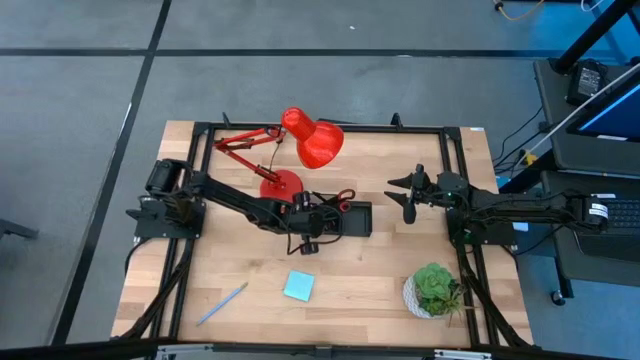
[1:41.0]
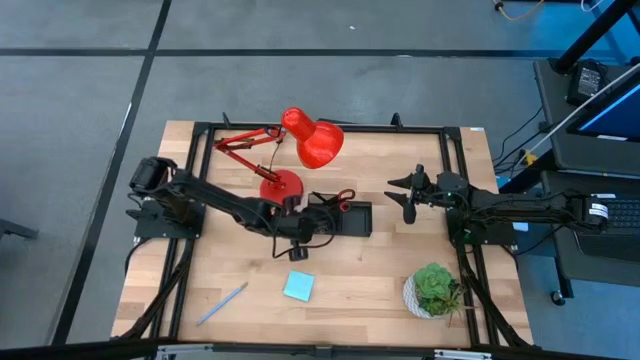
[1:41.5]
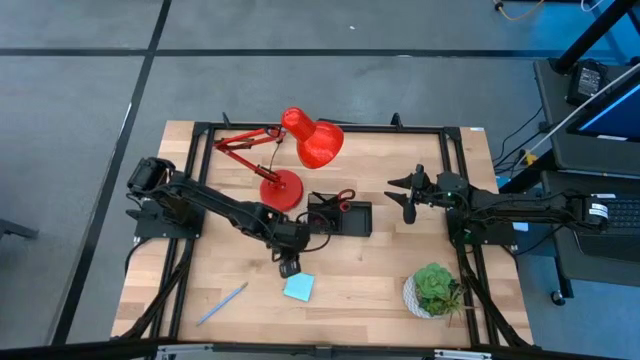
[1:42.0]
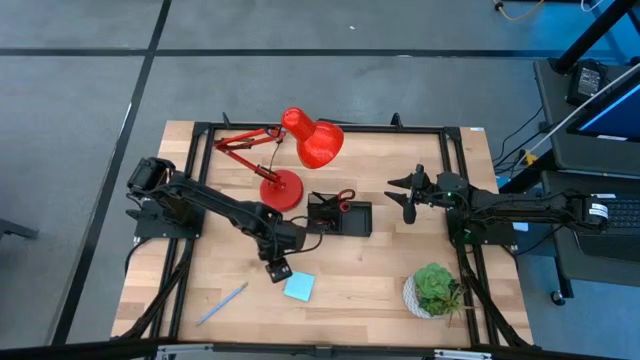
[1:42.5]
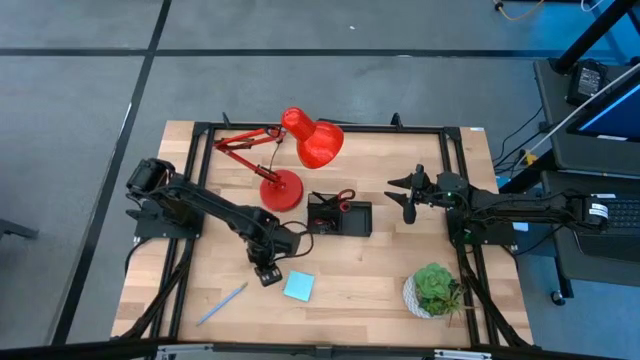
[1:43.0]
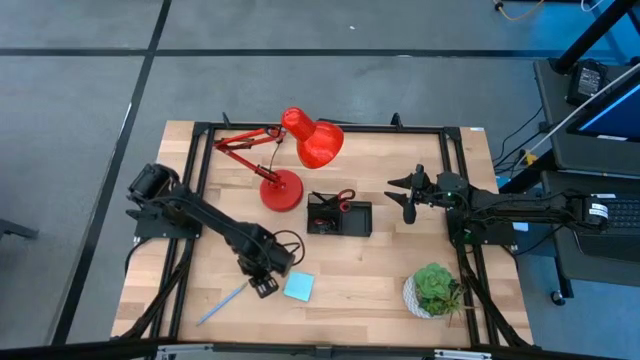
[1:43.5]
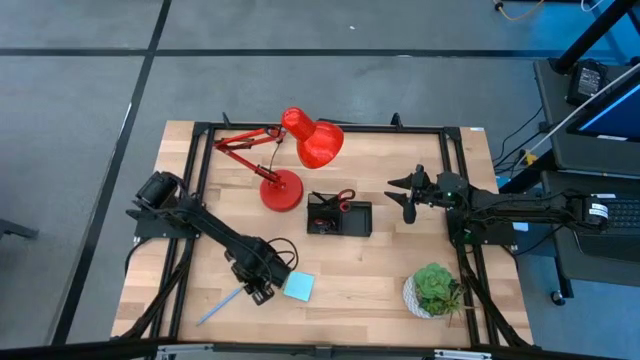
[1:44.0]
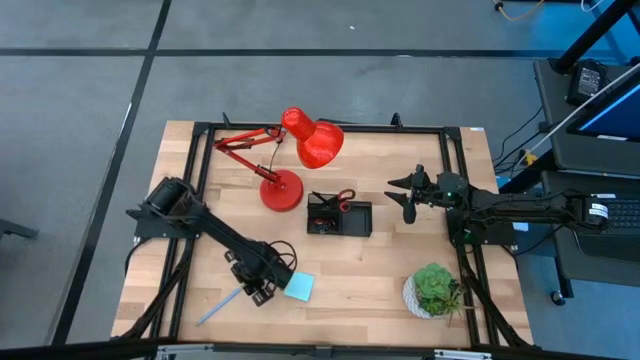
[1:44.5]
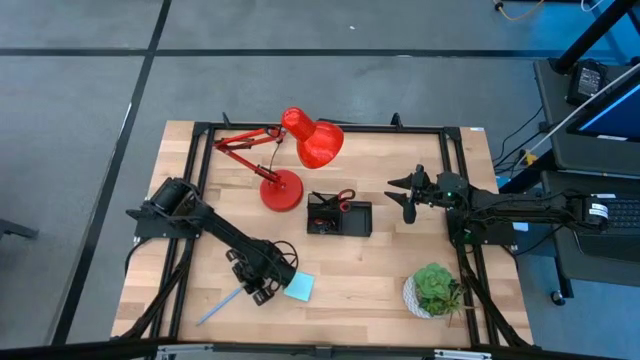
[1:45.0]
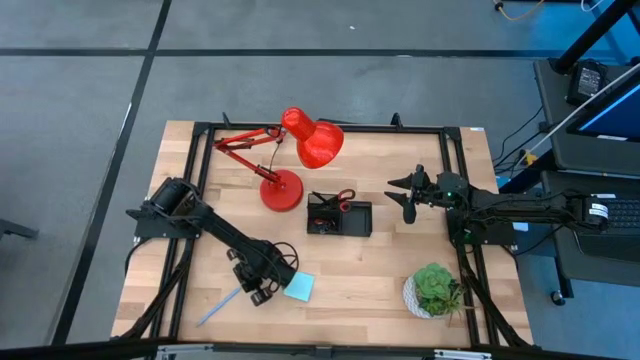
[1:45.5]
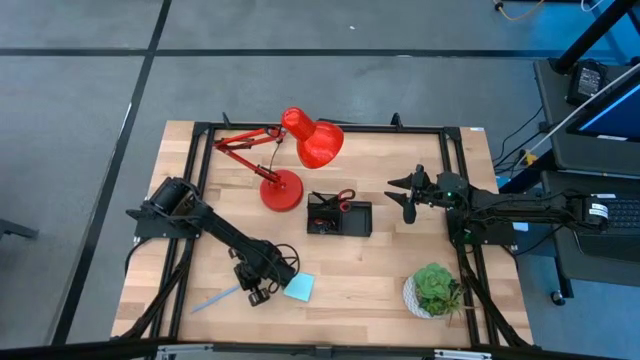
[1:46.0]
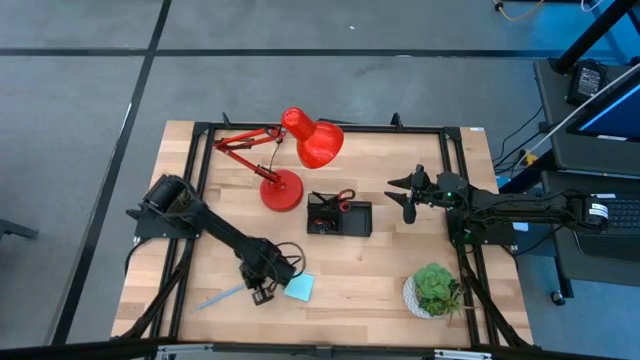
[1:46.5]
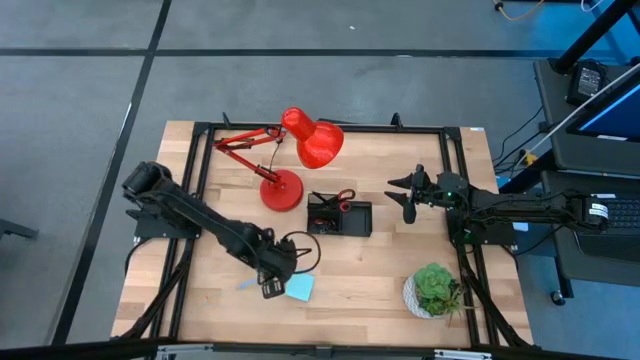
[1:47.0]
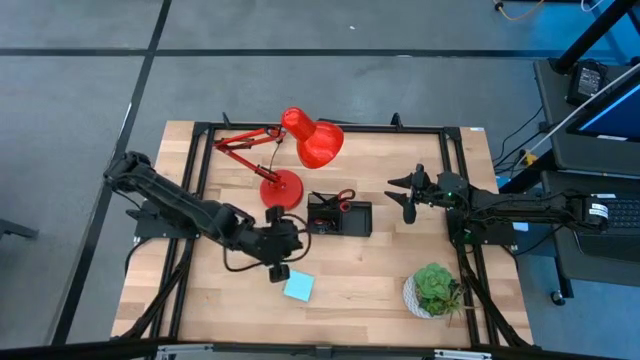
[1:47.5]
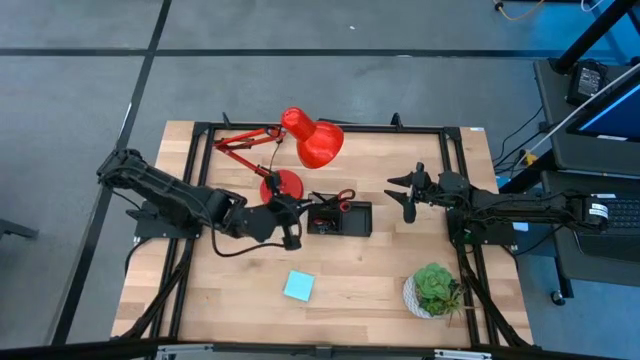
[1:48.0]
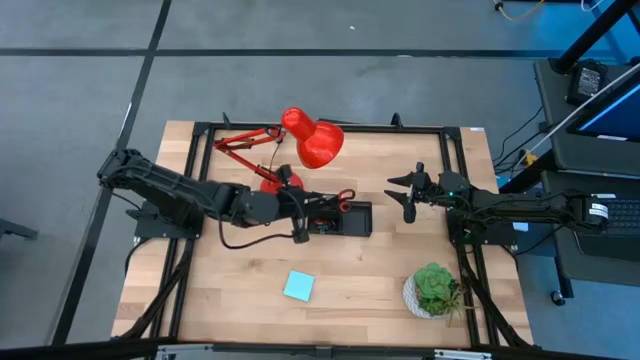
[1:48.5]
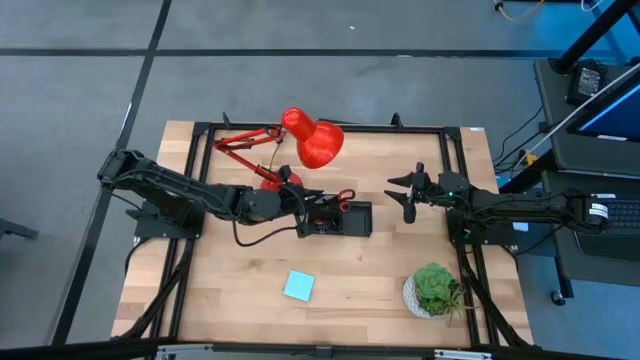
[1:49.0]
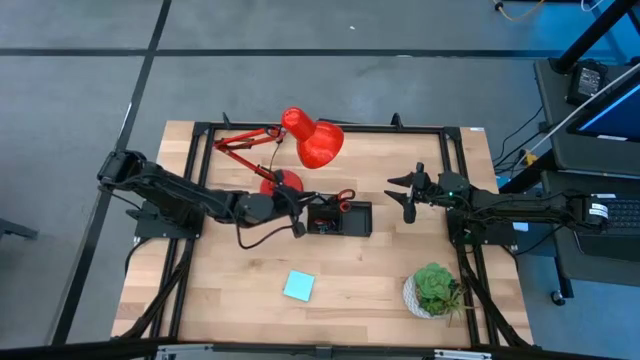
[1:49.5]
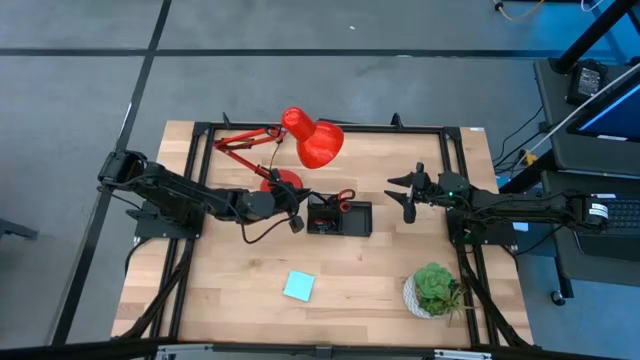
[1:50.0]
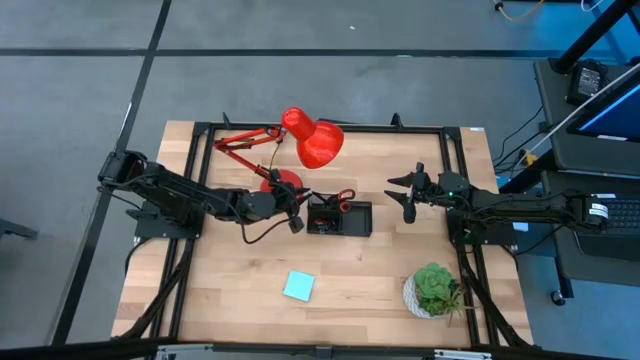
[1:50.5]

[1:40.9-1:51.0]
Task: Pick and place office supplies into organizer
Put the blue pencil into the black desk organizer

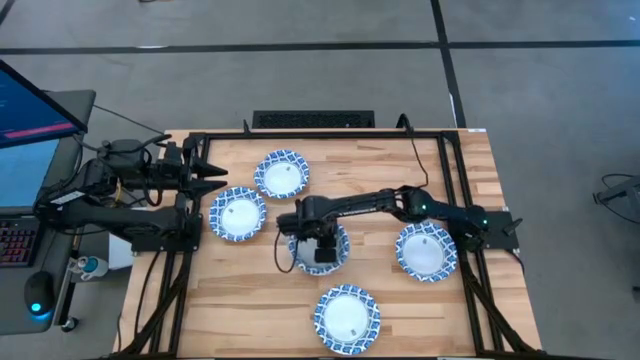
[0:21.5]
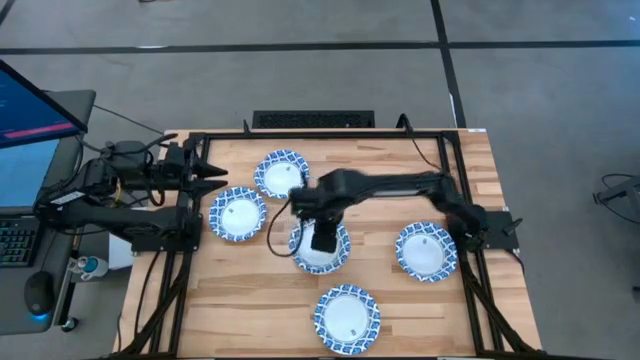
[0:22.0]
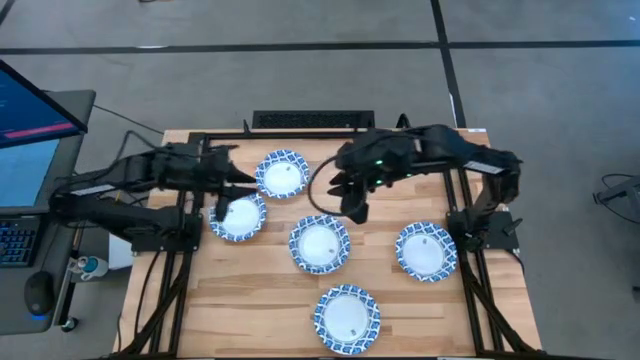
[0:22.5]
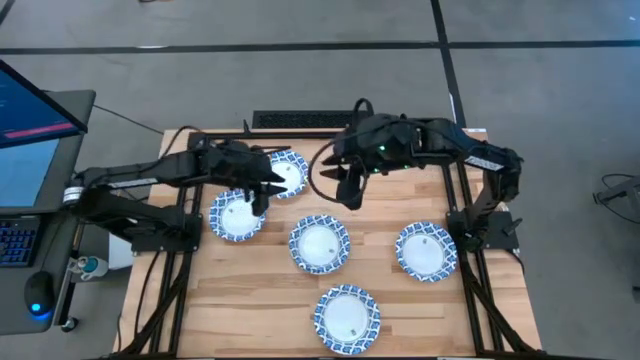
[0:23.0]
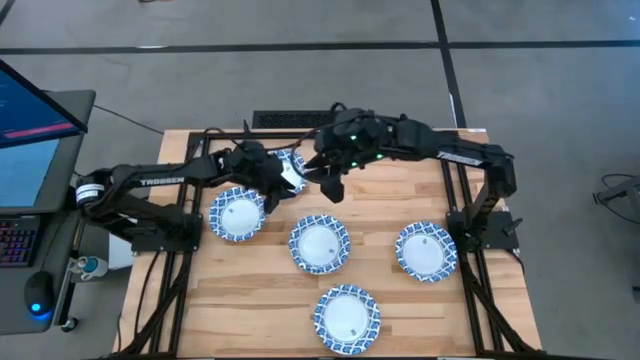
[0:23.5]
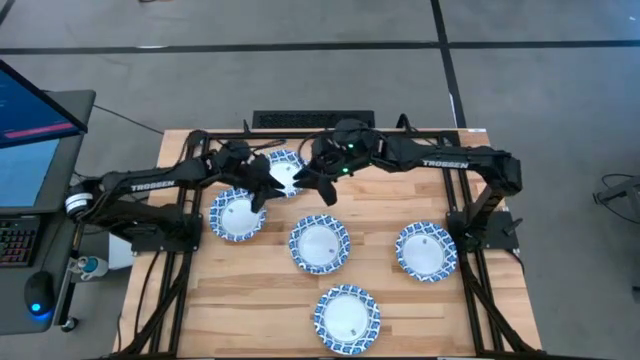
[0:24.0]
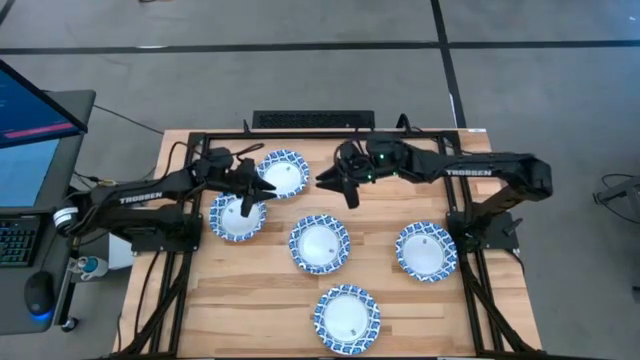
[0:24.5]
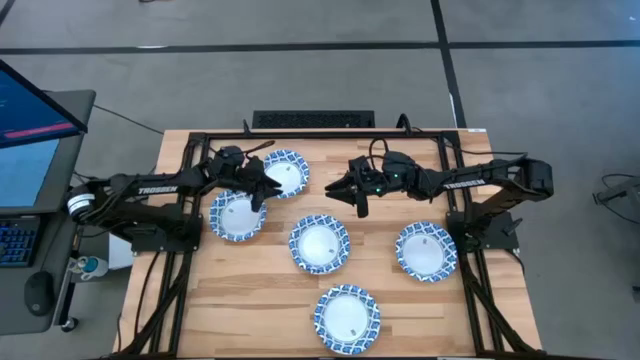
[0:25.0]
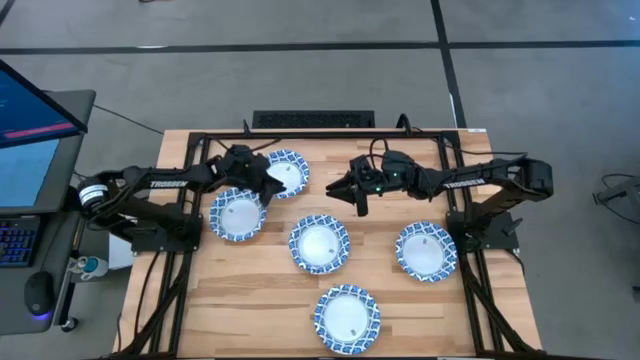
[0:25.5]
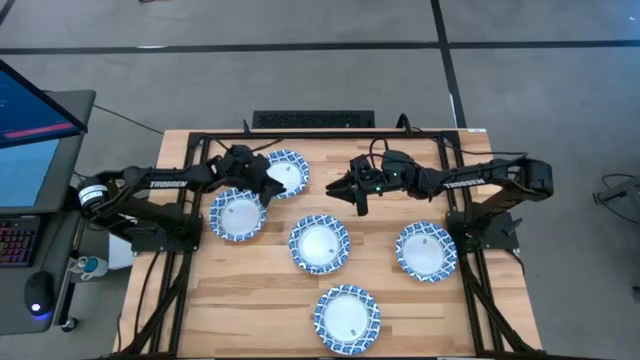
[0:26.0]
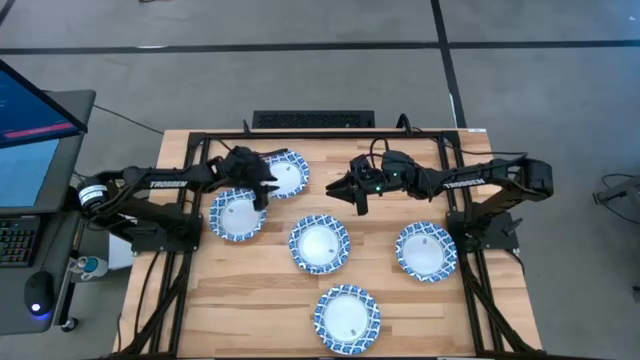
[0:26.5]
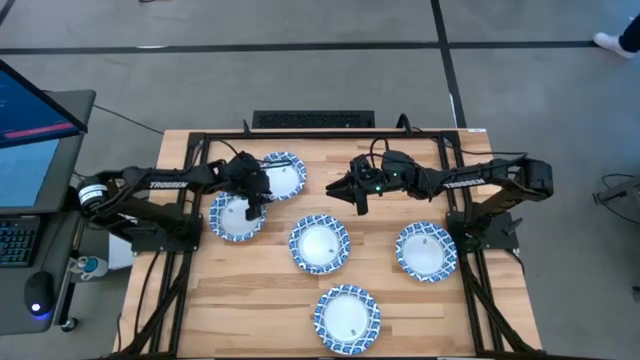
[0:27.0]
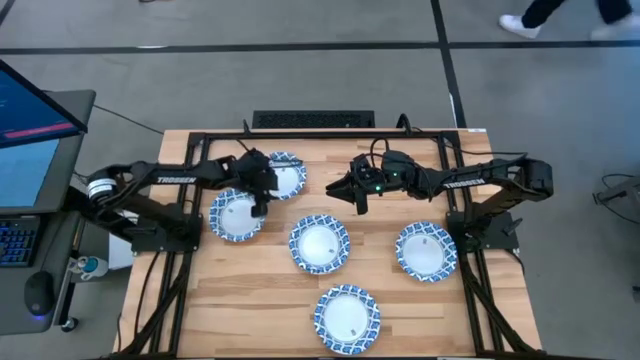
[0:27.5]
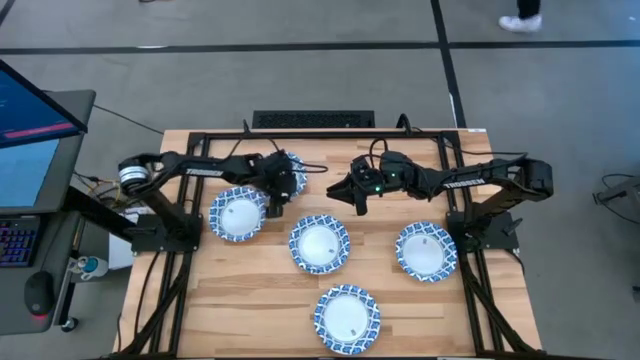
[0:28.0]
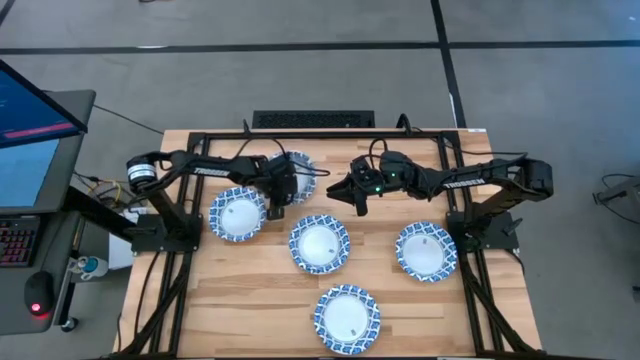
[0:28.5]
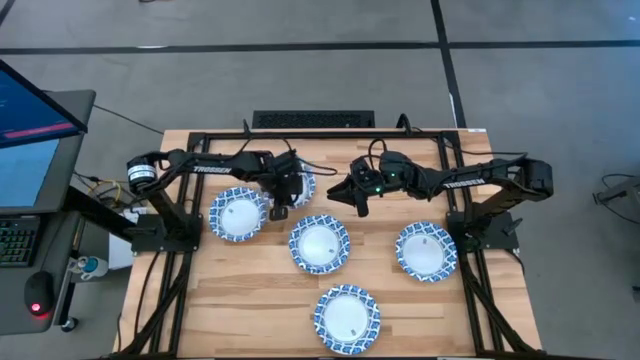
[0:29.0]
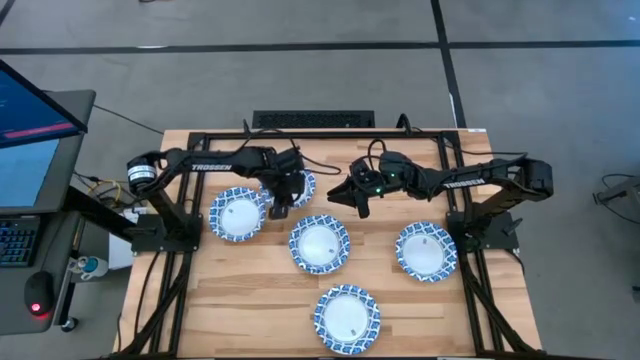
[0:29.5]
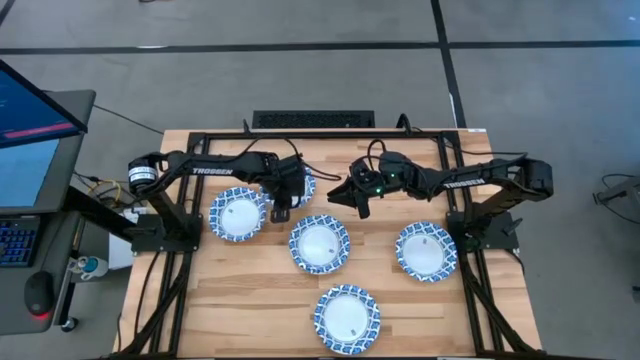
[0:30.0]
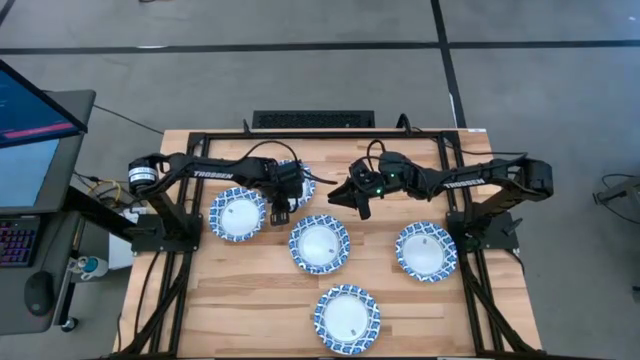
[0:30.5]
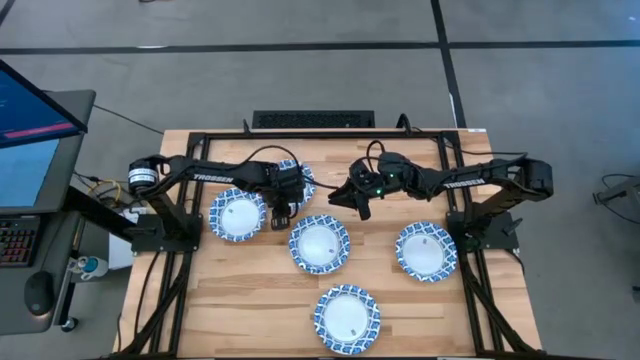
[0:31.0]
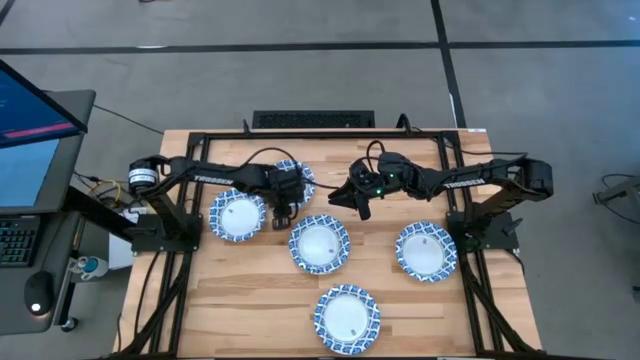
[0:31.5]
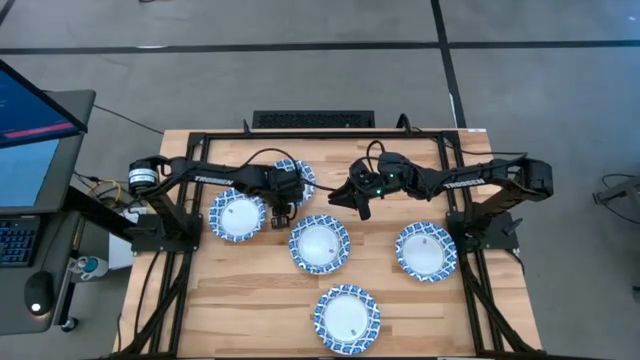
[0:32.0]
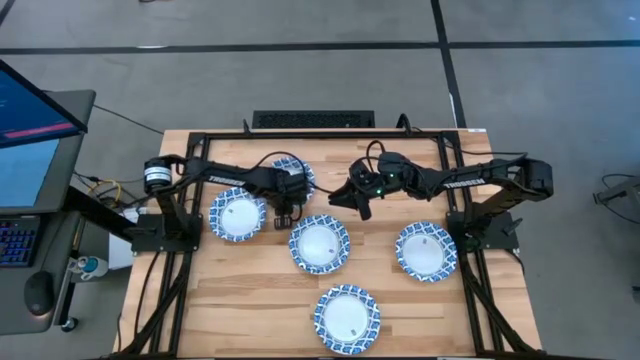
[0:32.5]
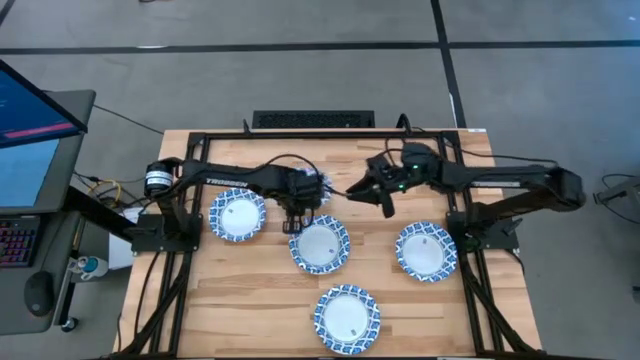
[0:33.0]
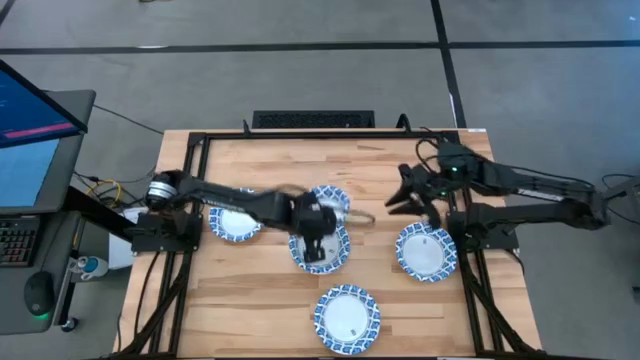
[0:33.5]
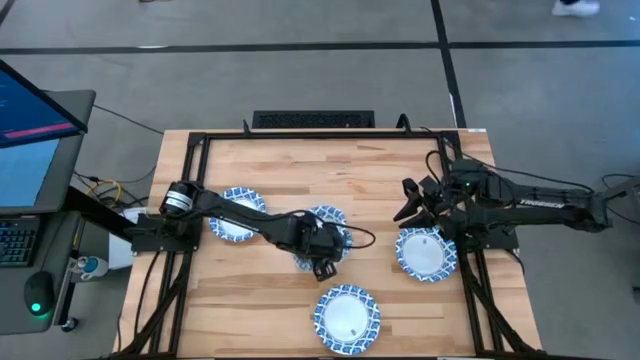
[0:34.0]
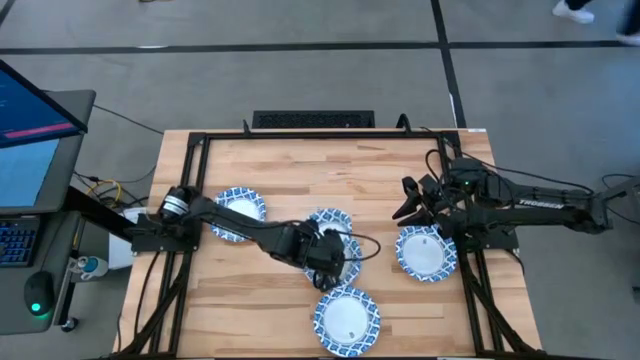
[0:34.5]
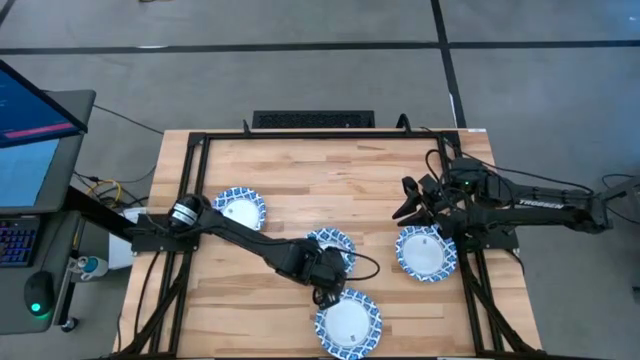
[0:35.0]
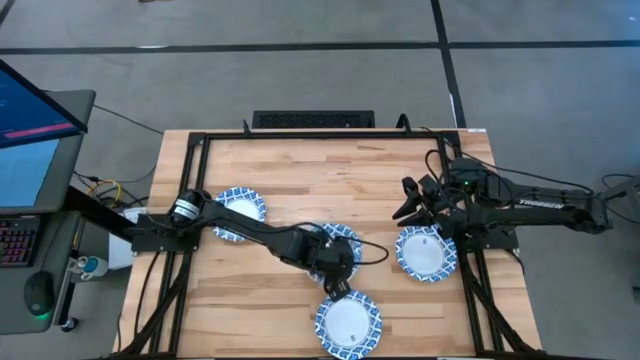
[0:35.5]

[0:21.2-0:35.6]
Task: Nest bowls inside each other
Stack the blue patterned bowl on the blue patterned bowl
